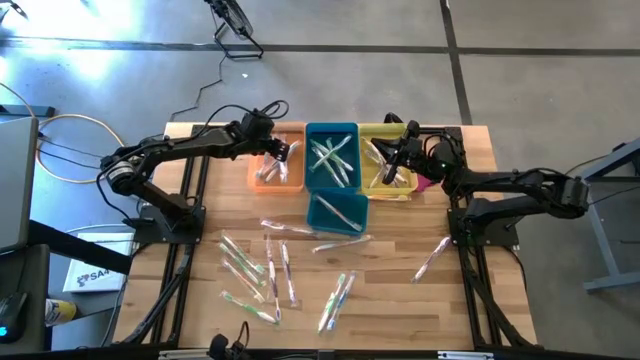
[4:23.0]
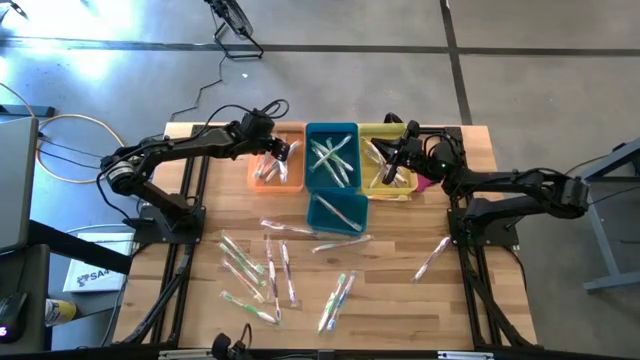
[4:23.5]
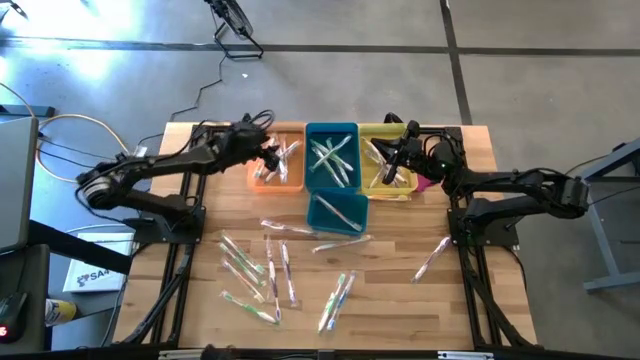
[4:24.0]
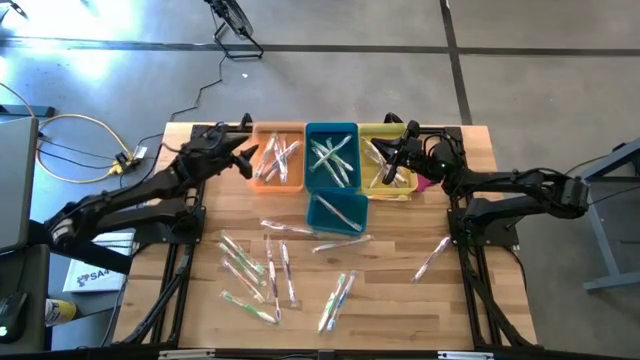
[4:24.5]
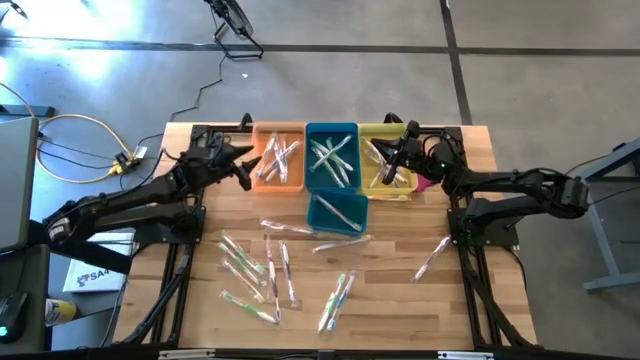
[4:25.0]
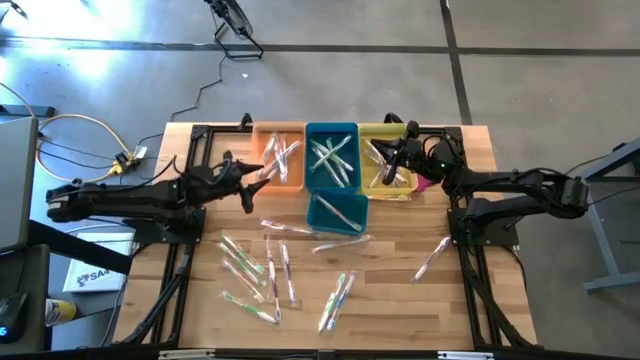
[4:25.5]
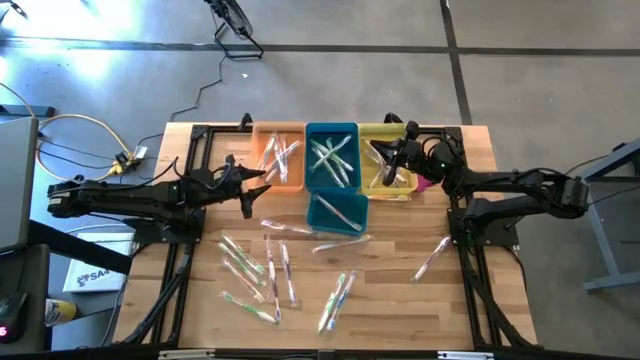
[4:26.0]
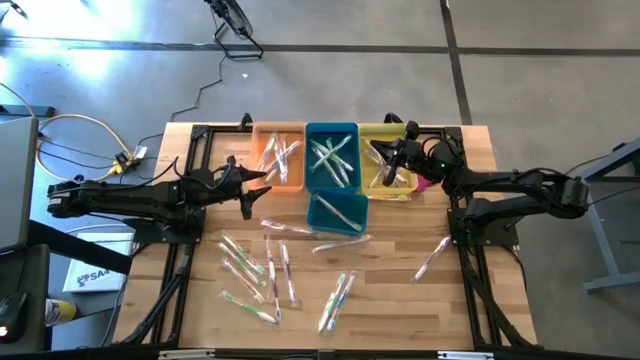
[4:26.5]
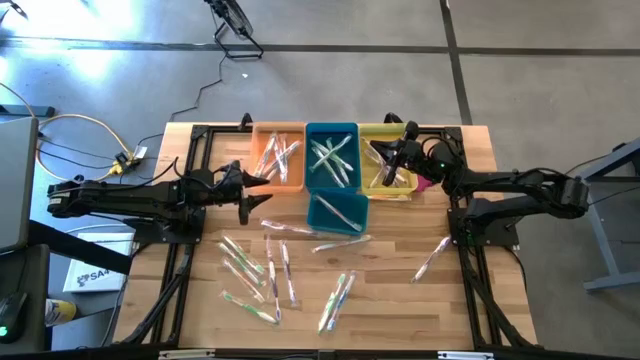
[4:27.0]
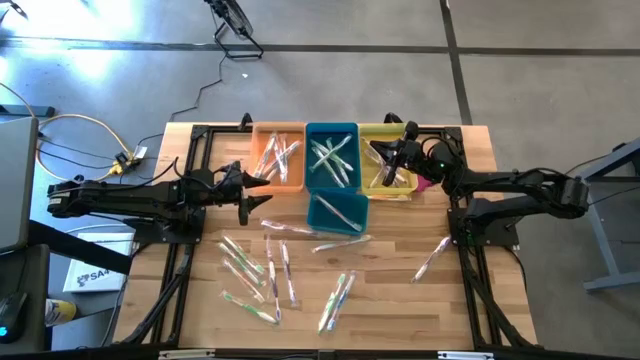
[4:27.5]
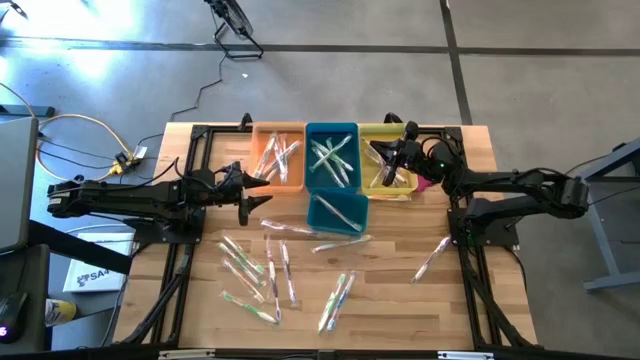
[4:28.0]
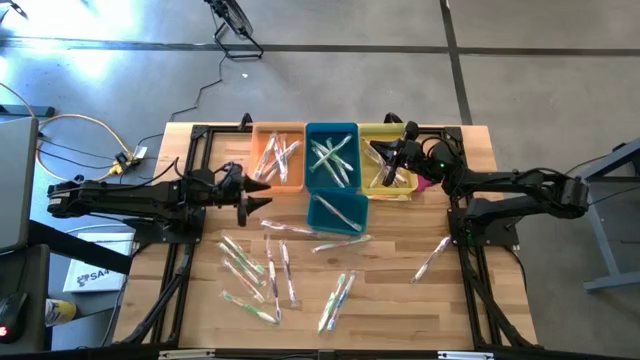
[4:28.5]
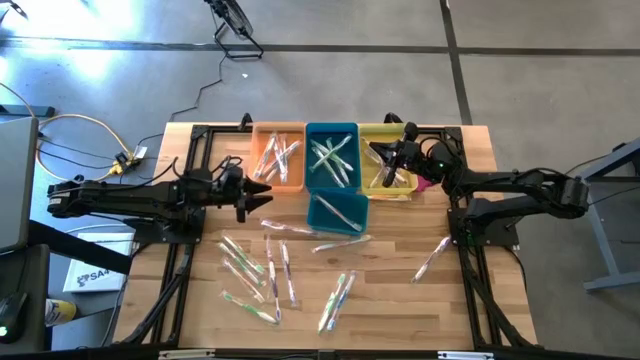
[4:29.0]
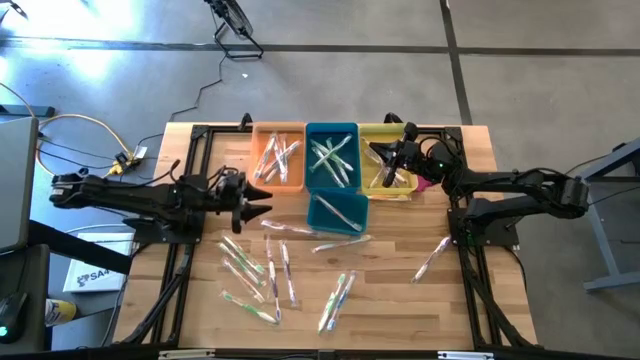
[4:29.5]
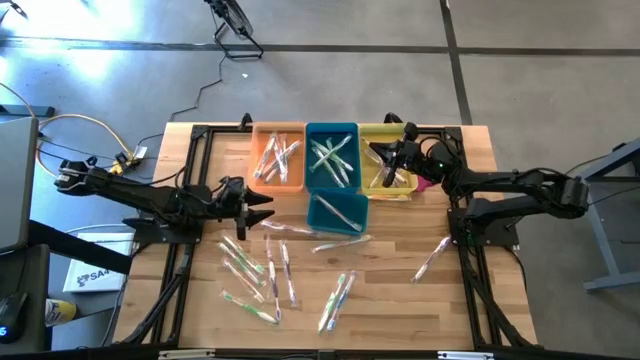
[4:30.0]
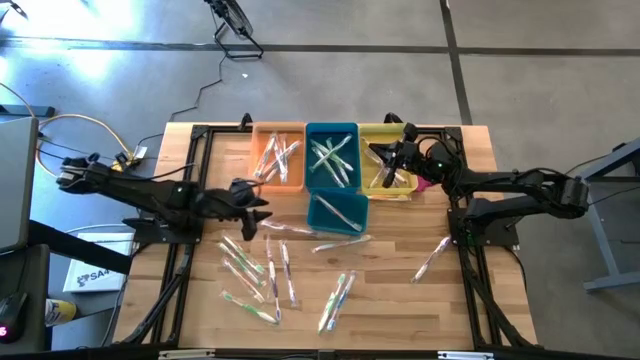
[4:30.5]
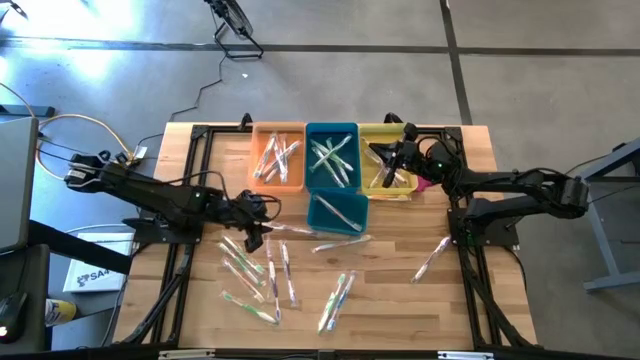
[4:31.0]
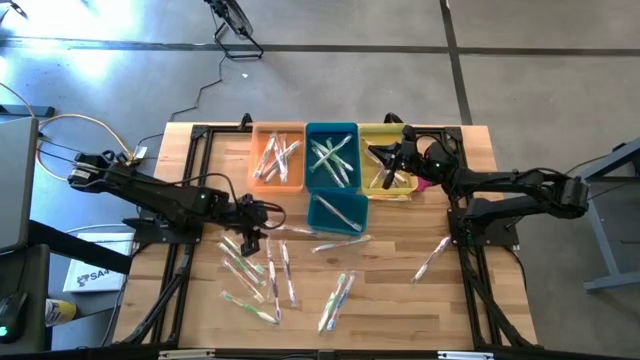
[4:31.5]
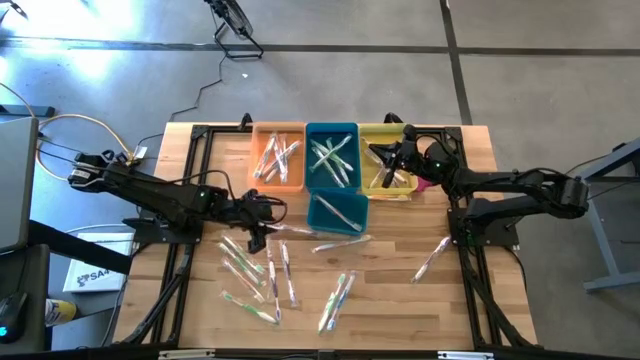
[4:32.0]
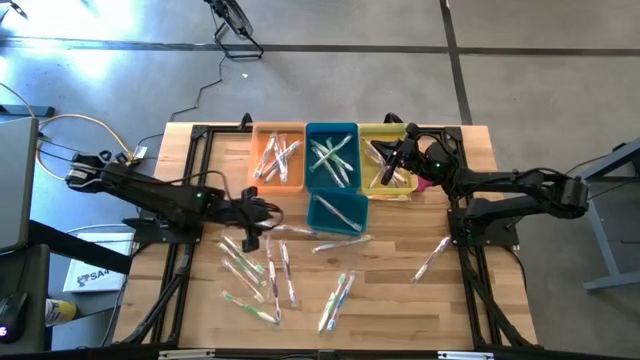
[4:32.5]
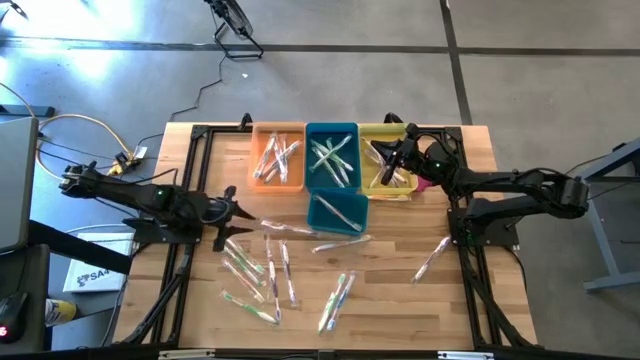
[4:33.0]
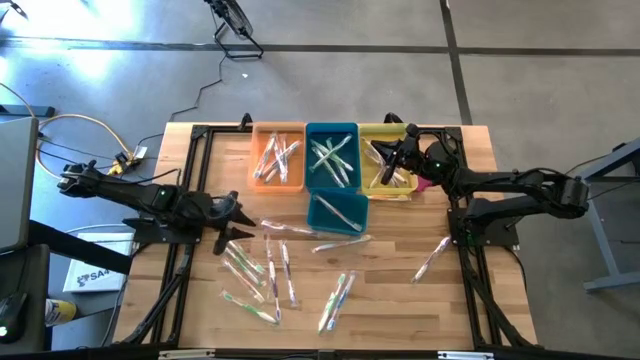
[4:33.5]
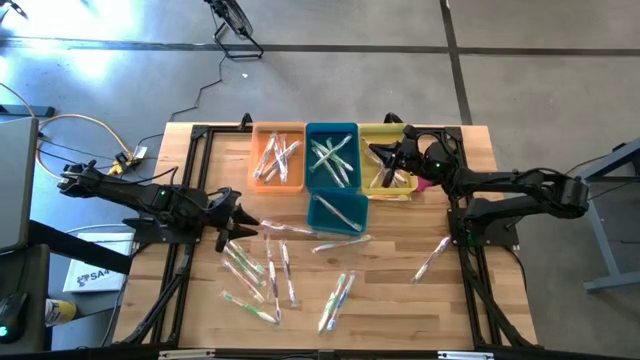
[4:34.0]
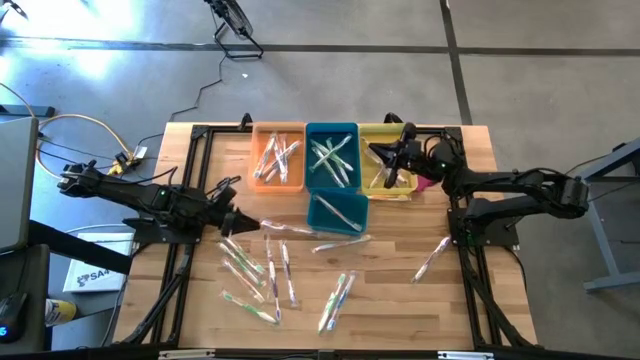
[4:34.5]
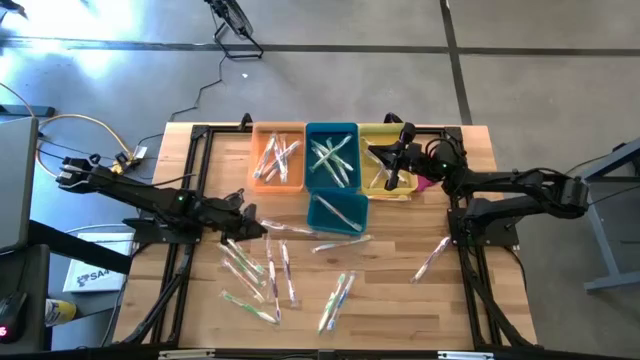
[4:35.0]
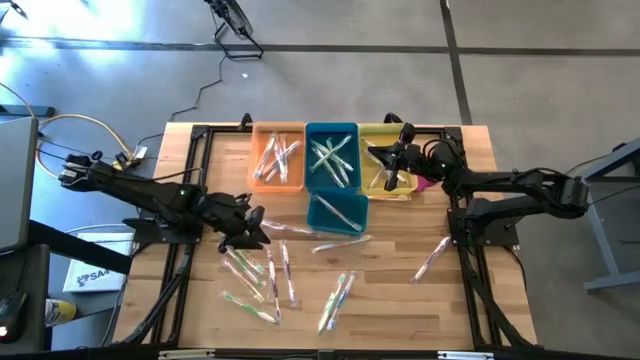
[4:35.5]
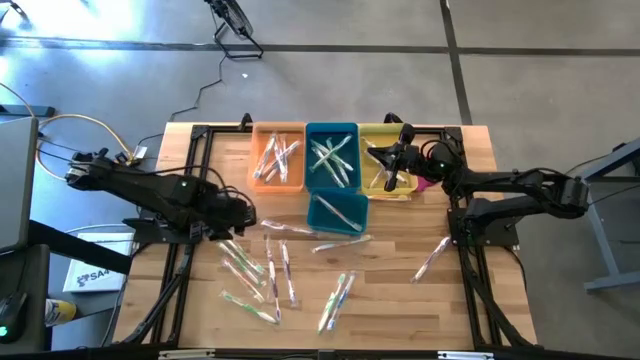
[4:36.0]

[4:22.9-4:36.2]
Task: Pick & Place Toothbrushes
Put the green toothbrush into the top blue bin

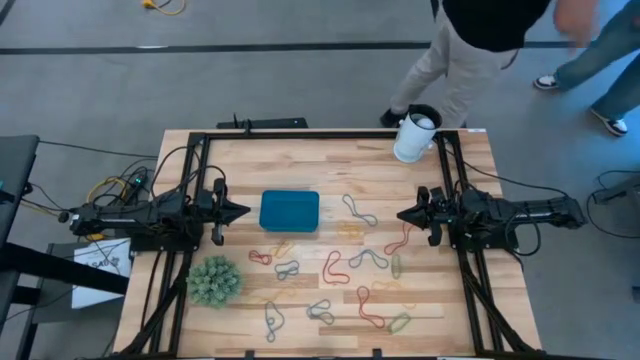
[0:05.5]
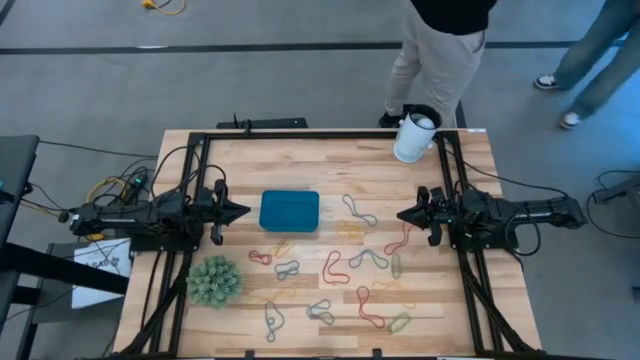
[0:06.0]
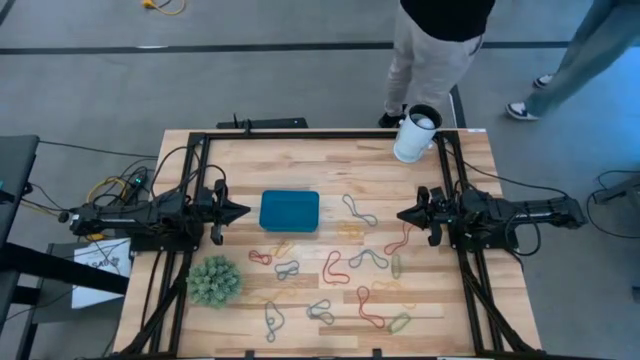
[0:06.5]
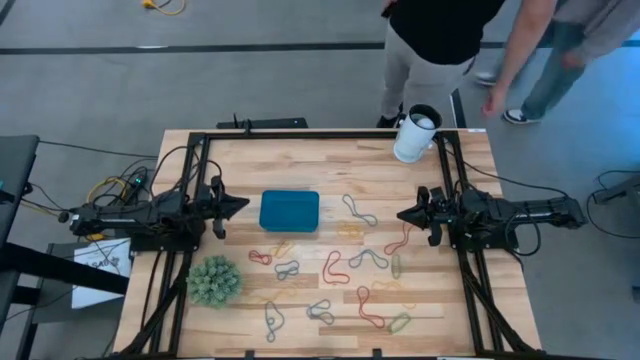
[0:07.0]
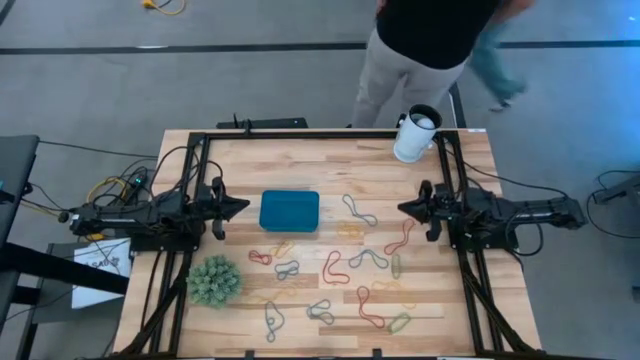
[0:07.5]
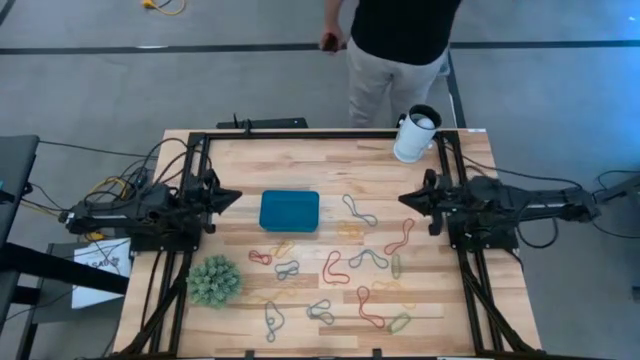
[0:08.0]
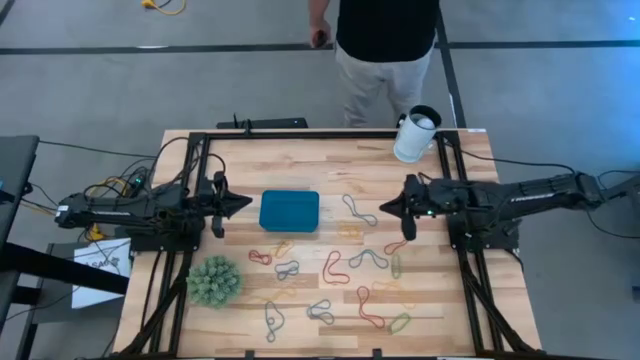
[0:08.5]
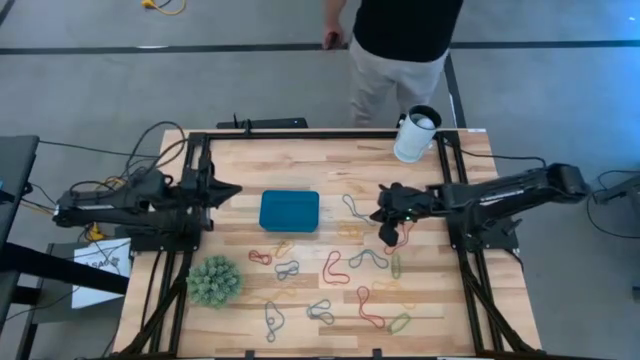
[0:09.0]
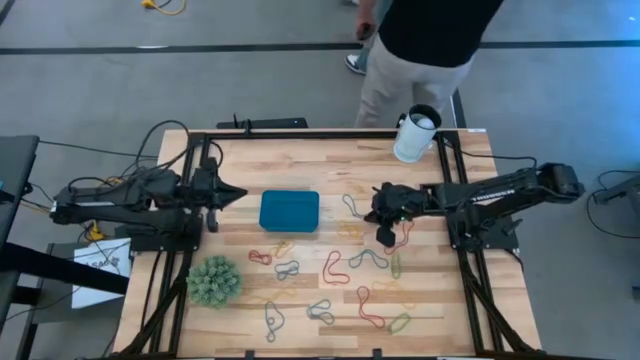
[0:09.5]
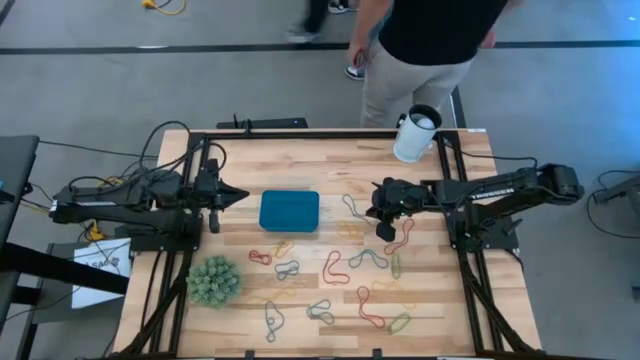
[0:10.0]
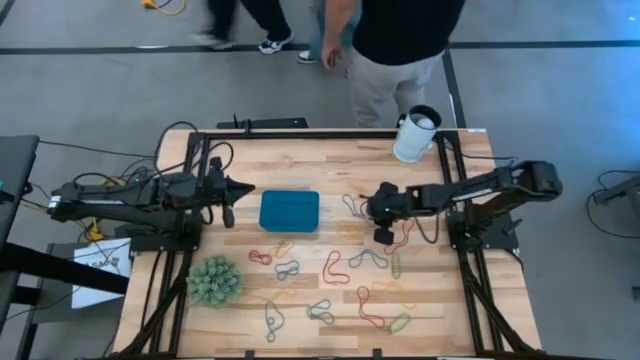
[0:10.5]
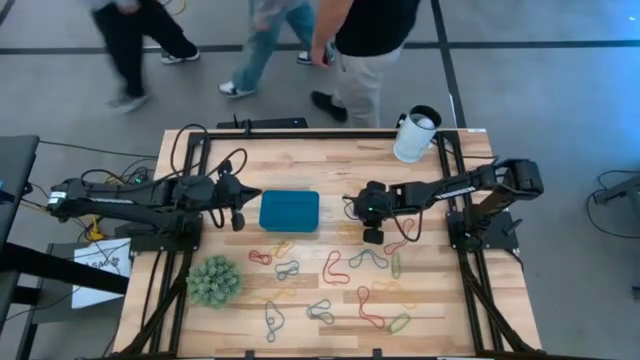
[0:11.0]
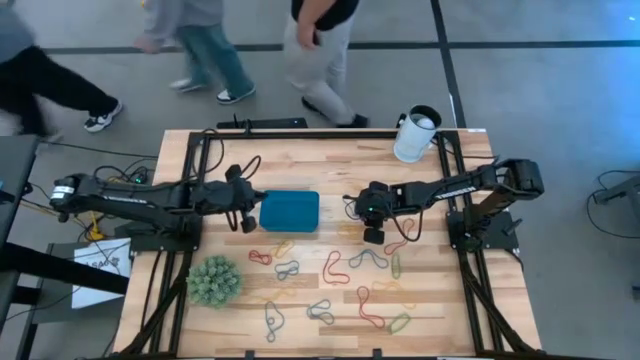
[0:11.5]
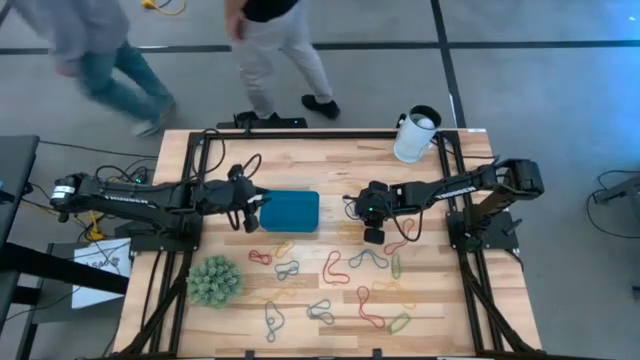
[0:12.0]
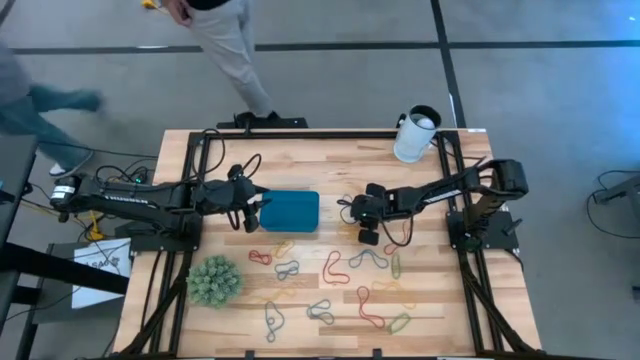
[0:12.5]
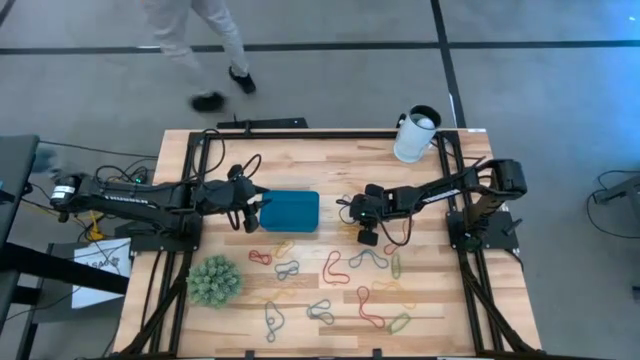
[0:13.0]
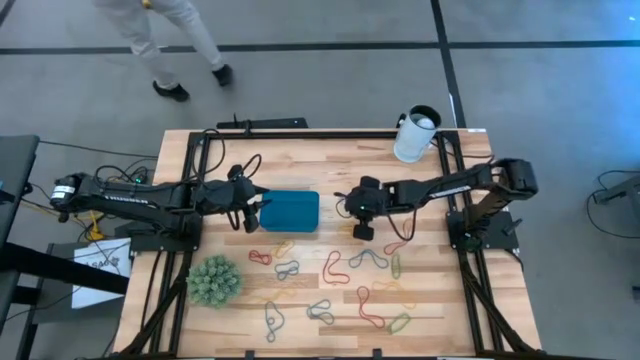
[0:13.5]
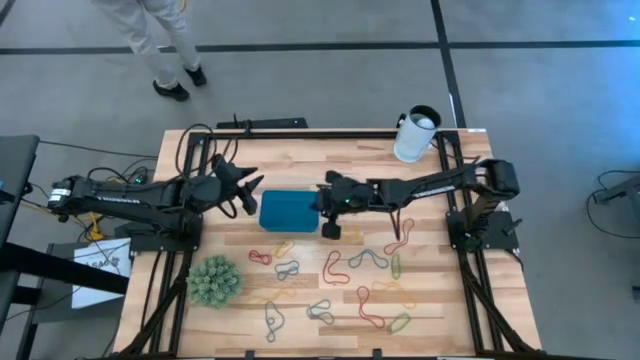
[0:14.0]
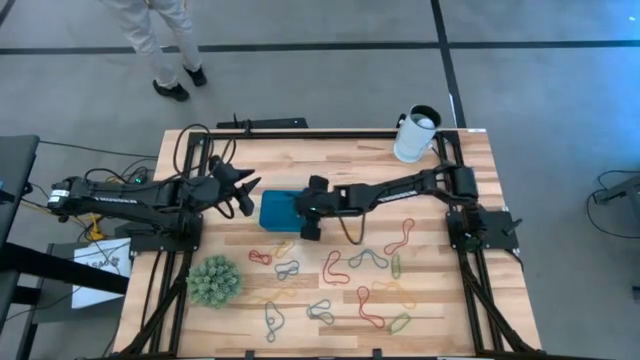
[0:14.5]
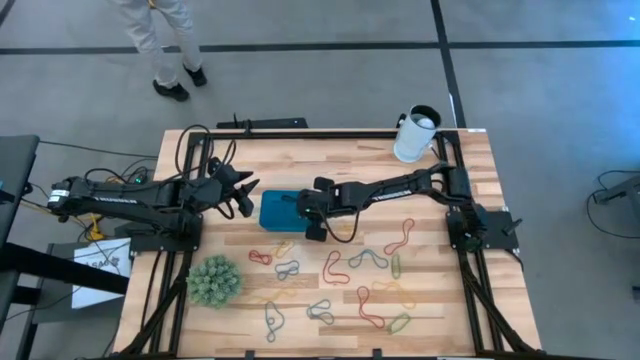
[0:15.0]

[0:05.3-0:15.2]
Task: Pick and place items into bin
Put the blue rubber band into the blue bin
